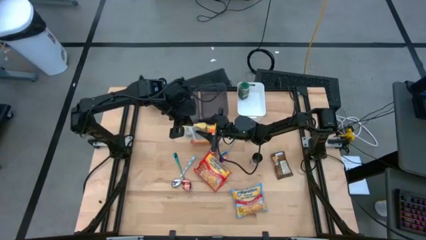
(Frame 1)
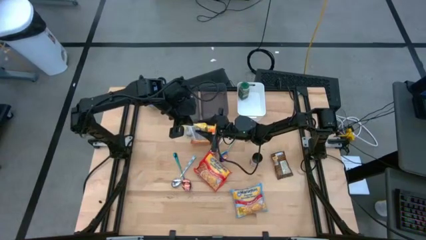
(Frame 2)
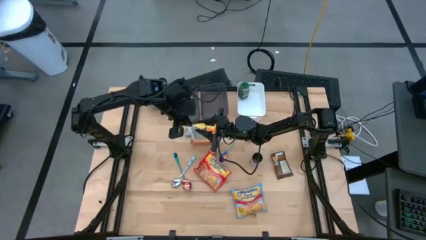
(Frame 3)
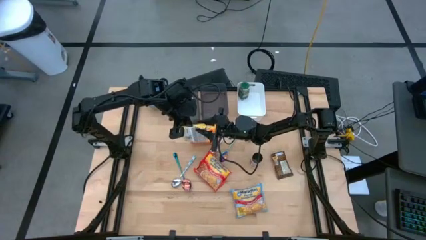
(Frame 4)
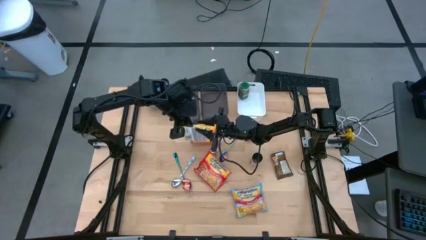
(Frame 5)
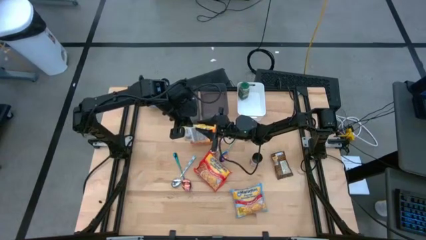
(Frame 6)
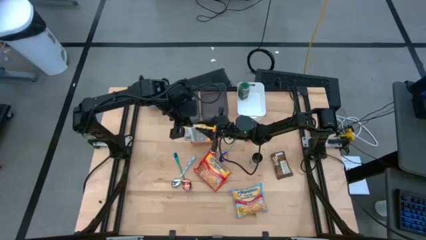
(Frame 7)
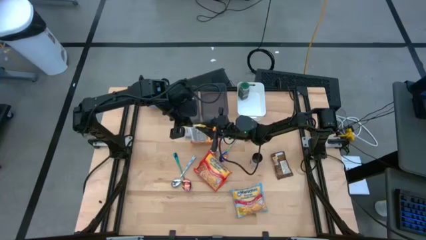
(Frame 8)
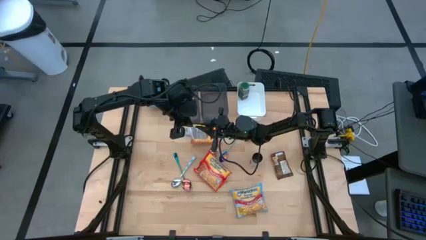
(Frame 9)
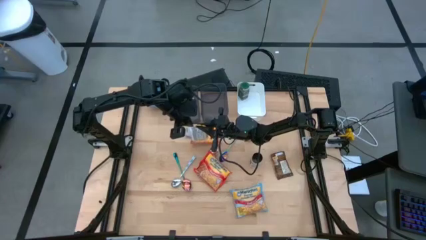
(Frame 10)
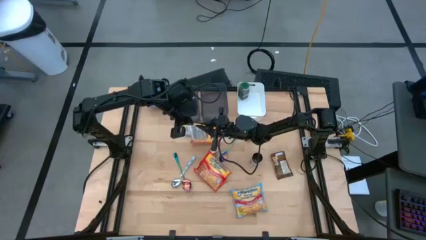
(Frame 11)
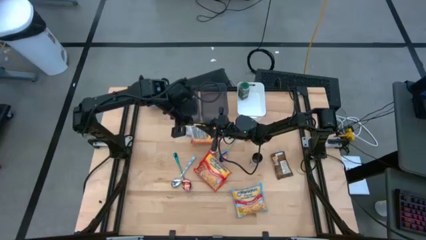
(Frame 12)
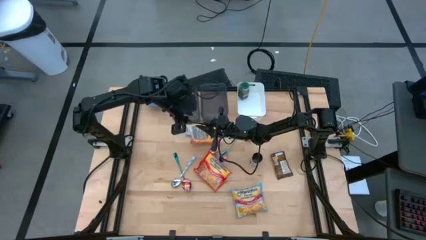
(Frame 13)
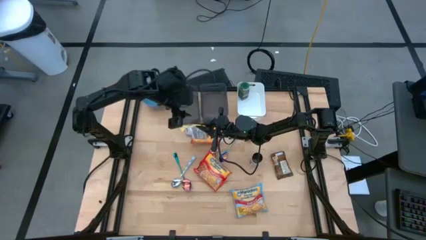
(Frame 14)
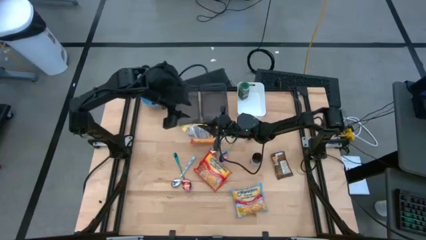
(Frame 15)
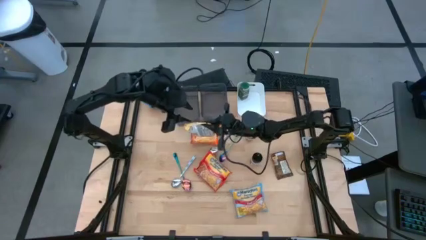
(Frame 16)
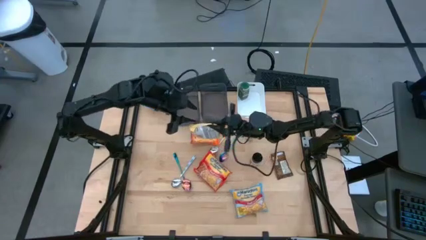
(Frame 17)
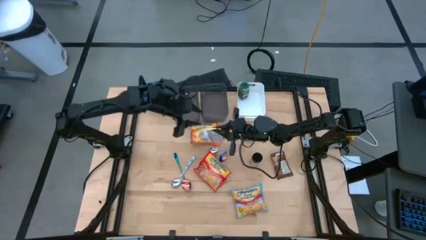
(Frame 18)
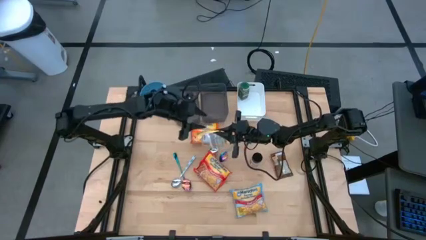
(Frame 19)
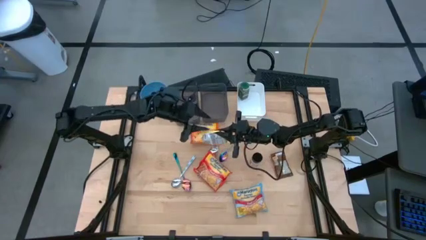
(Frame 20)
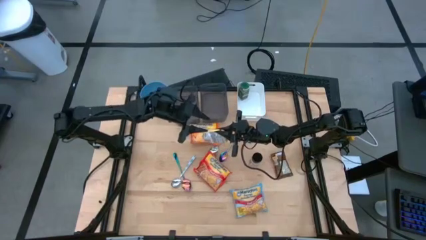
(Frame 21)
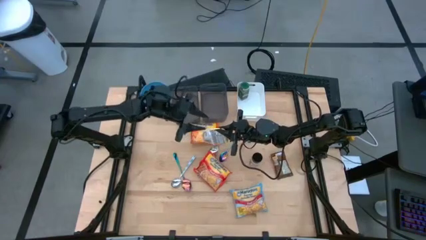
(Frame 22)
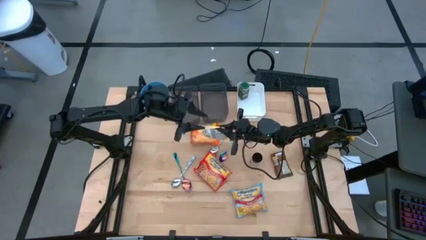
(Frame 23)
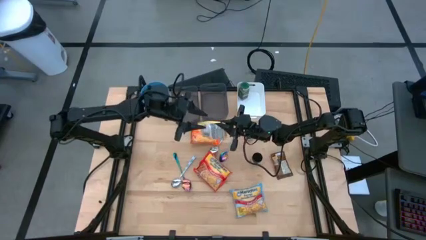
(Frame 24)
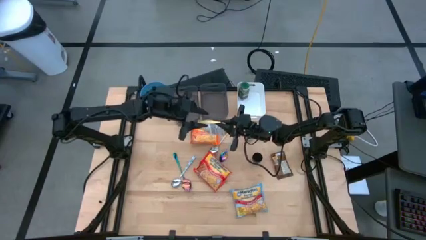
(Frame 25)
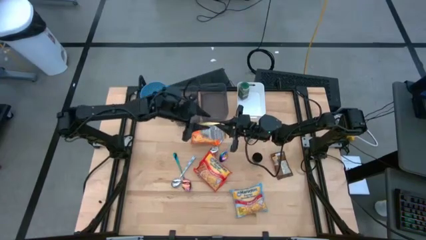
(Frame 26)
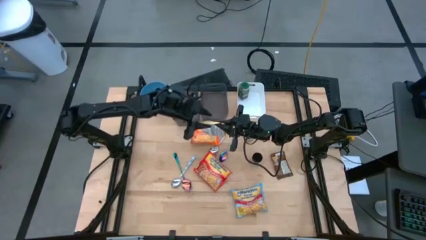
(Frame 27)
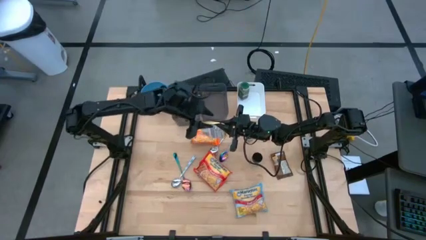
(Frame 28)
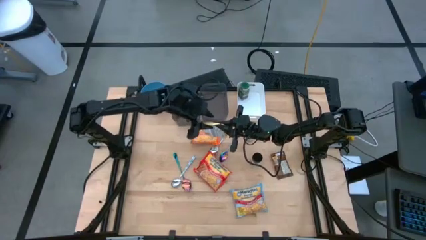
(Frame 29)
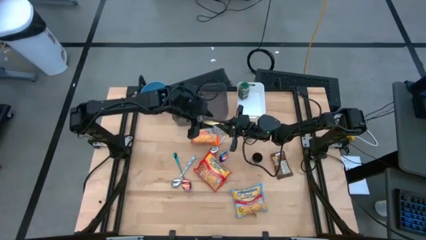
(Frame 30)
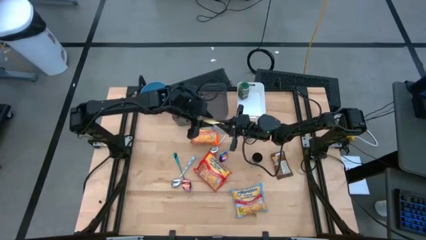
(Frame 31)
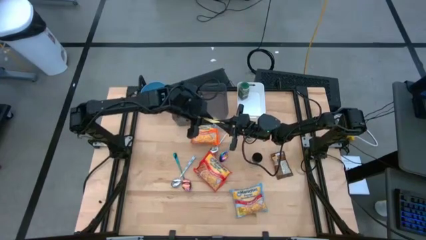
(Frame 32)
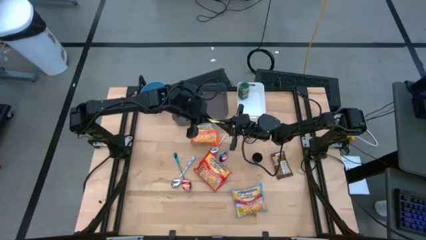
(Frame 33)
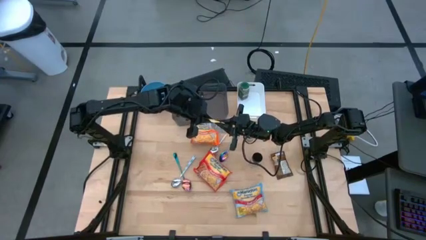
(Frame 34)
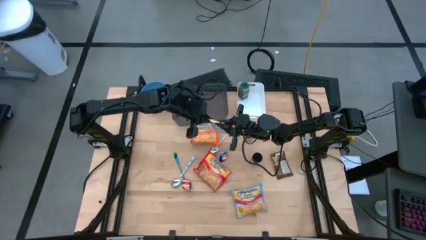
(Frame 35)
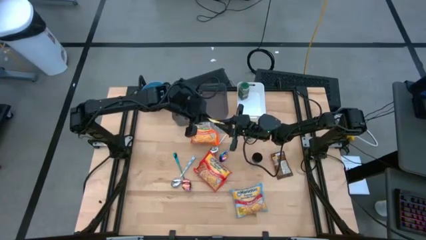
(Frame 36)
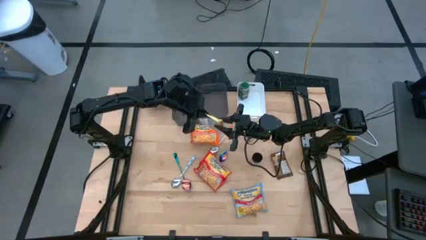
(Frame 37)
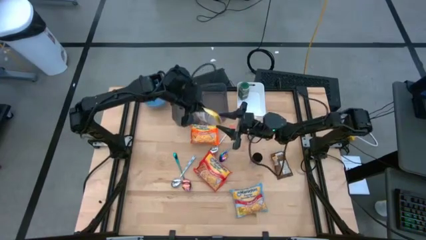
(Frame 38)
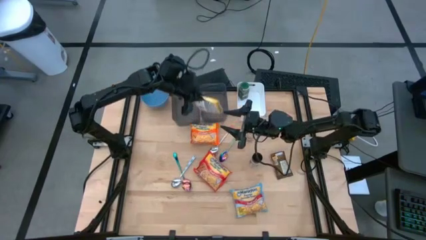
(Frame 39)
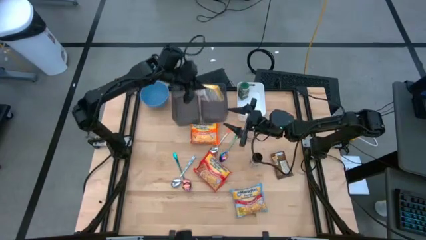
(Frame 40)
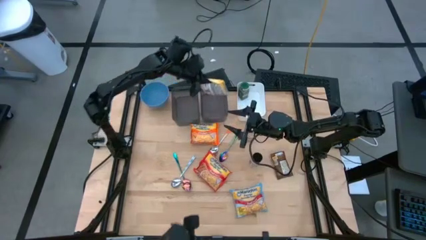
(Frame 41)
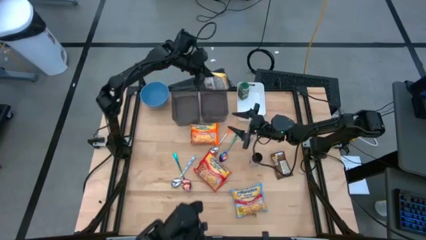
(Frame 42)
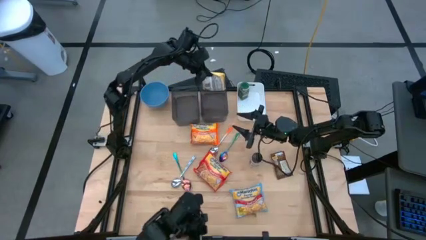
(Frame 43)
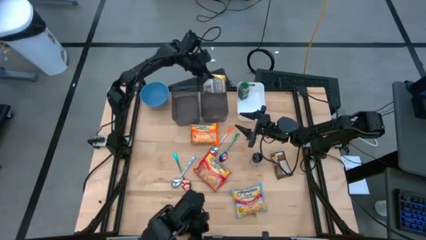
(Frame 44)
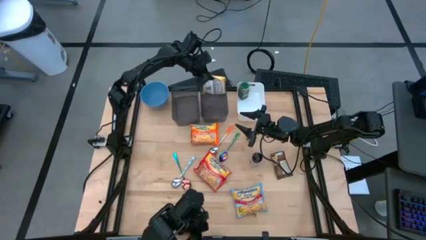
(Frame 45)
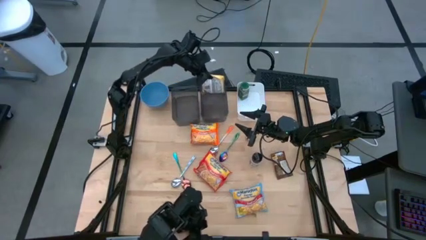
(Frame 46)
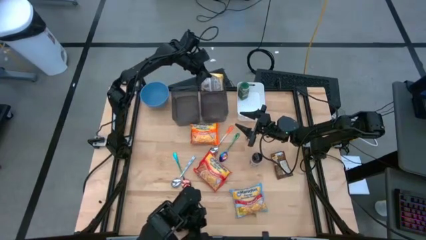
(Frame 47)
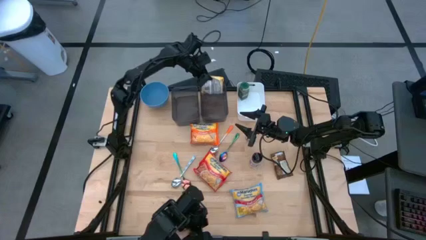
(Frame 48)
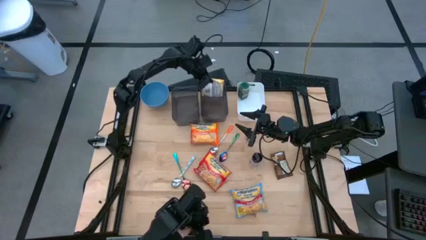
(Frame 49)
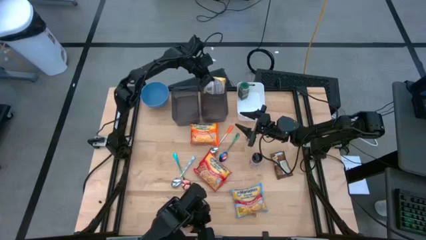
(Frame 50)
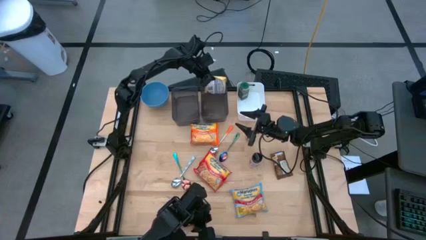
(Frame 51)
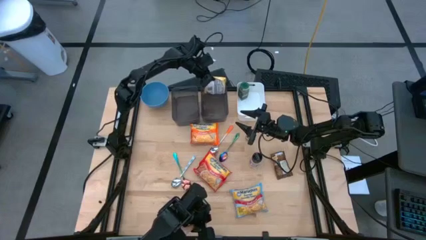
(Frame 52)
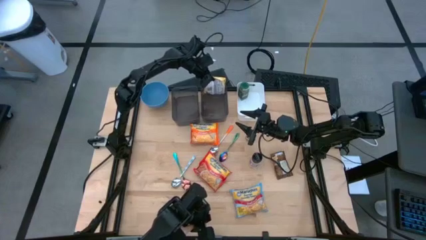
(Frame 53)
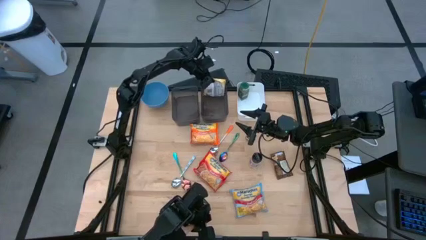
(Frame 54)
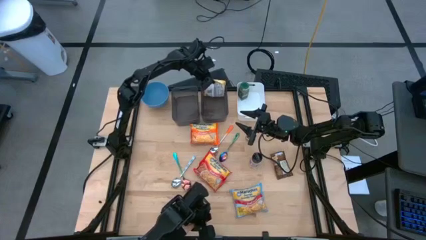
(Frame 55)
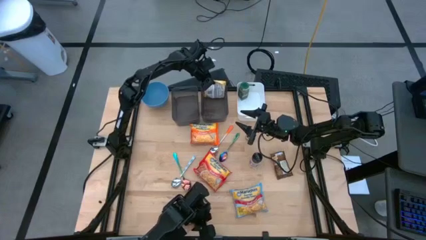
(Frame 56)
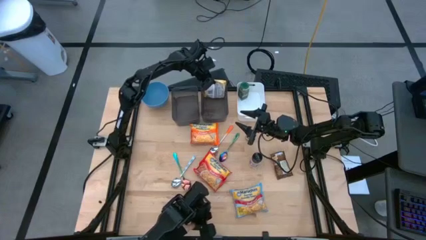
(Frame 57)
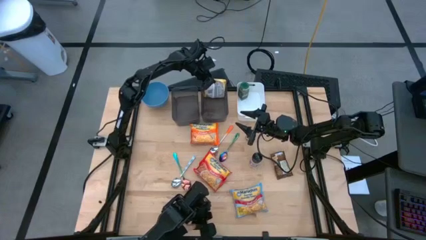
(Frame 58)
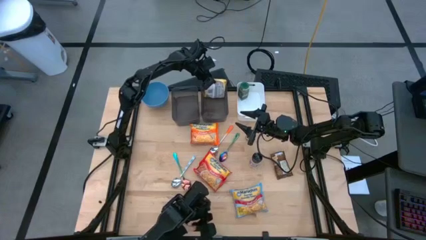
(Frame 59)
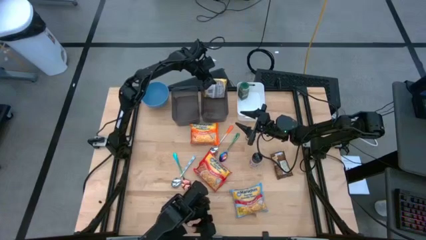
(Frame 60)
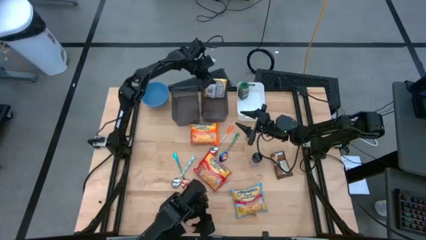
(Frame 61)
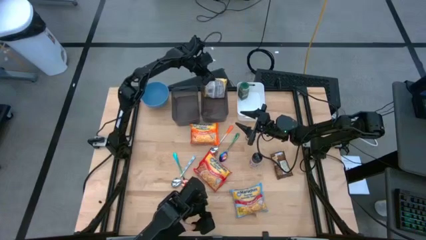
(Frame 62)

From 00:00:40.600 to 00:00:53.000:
Task: Pick & Place Food Item
Put the yellow noodle pack into the right black bin
